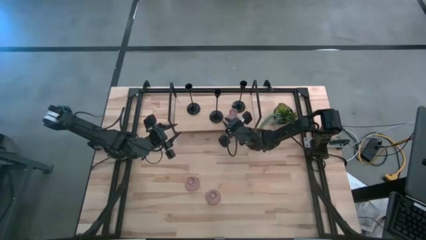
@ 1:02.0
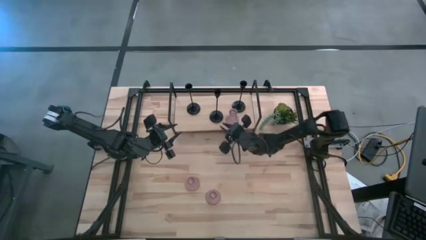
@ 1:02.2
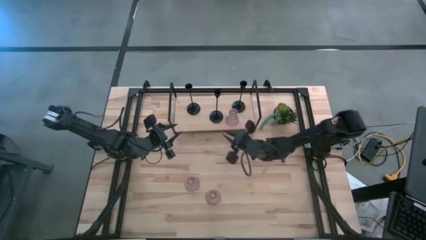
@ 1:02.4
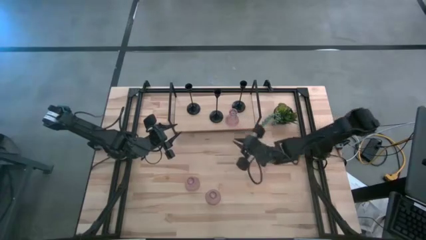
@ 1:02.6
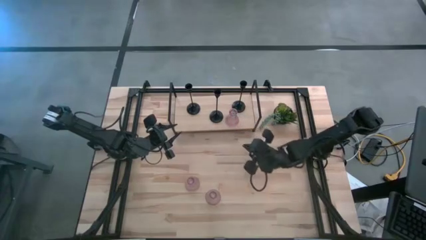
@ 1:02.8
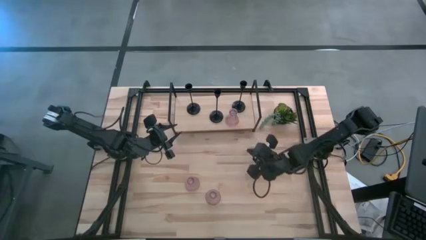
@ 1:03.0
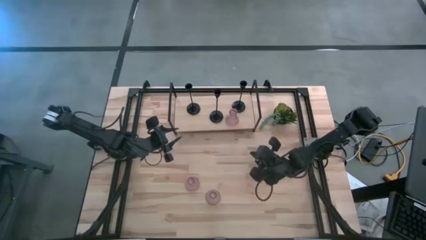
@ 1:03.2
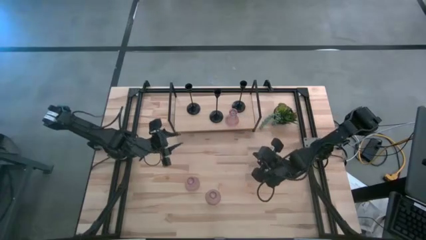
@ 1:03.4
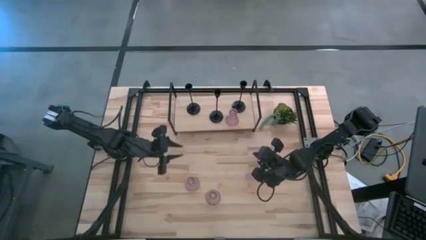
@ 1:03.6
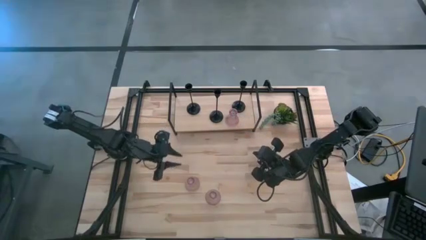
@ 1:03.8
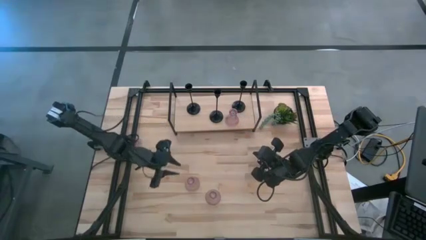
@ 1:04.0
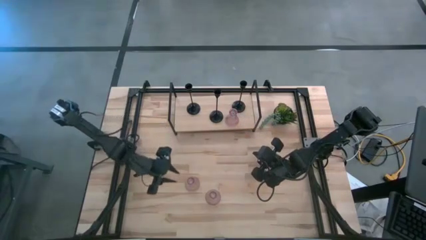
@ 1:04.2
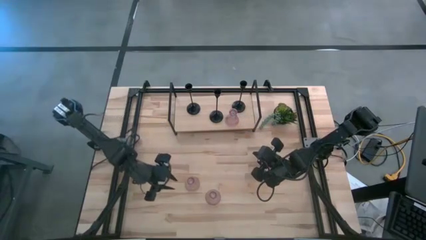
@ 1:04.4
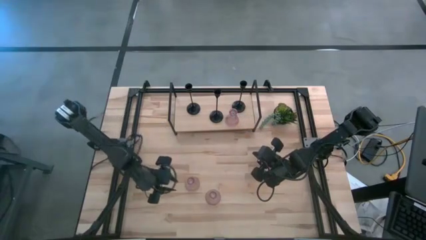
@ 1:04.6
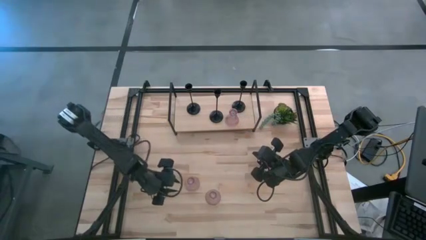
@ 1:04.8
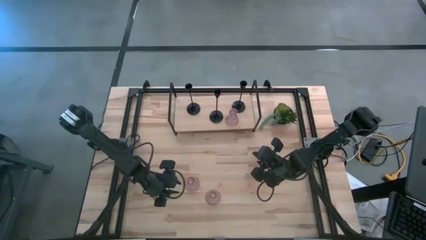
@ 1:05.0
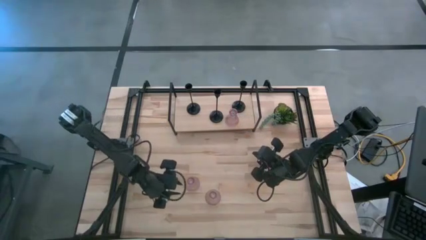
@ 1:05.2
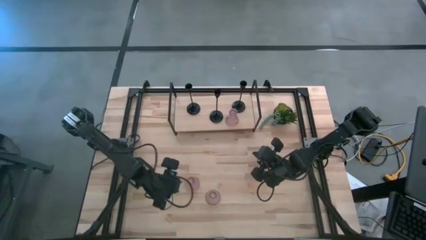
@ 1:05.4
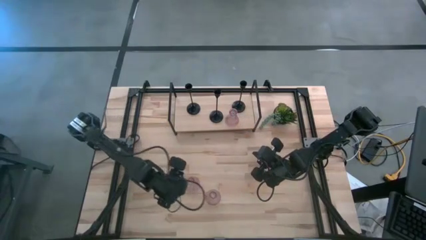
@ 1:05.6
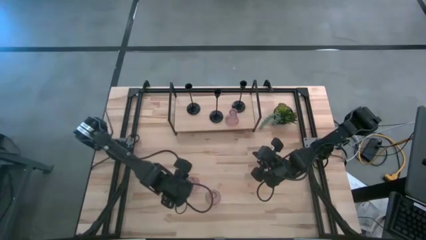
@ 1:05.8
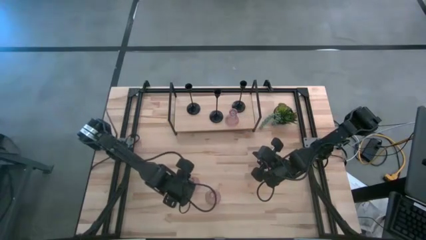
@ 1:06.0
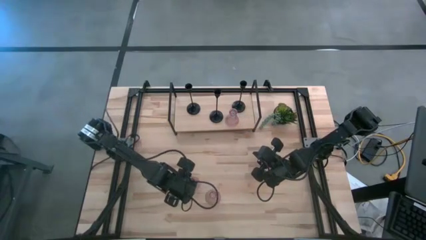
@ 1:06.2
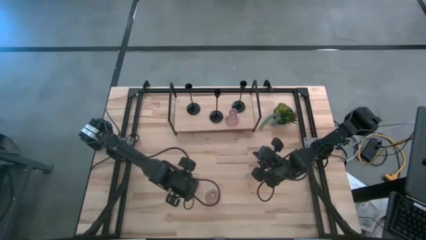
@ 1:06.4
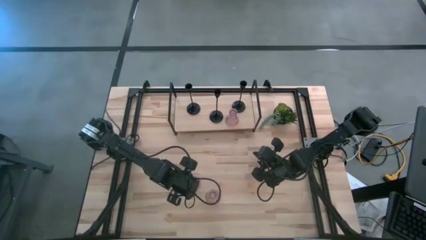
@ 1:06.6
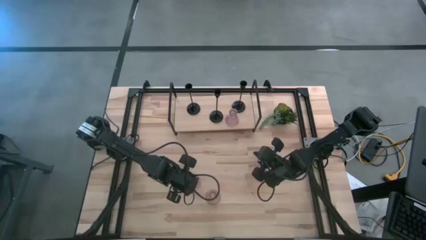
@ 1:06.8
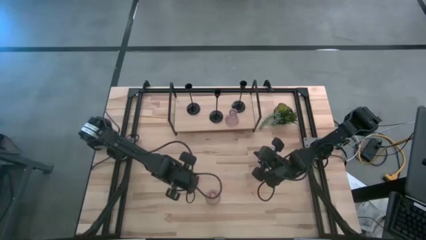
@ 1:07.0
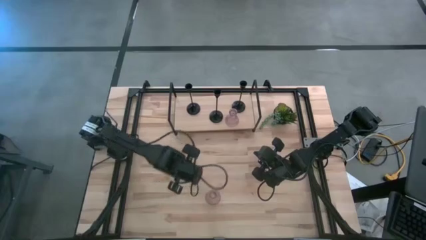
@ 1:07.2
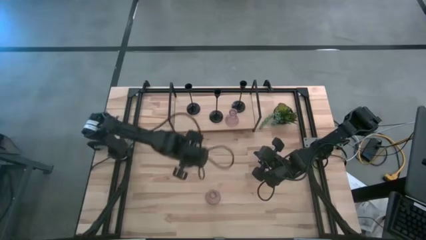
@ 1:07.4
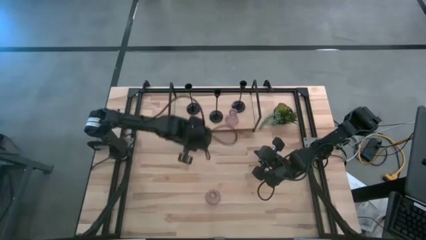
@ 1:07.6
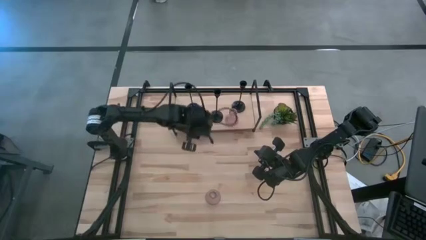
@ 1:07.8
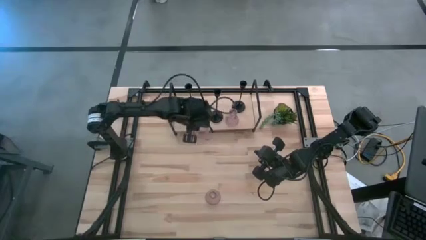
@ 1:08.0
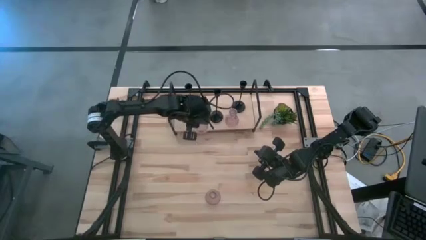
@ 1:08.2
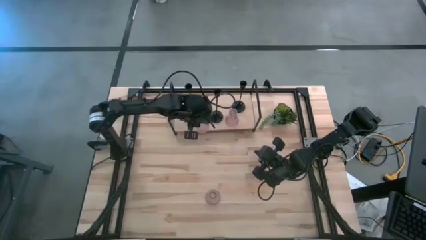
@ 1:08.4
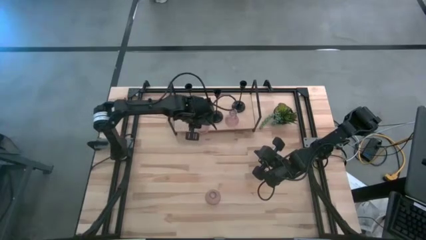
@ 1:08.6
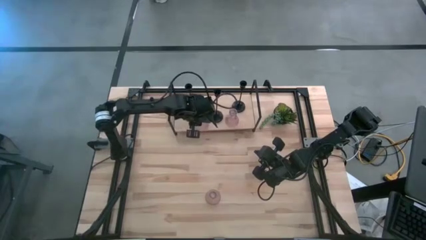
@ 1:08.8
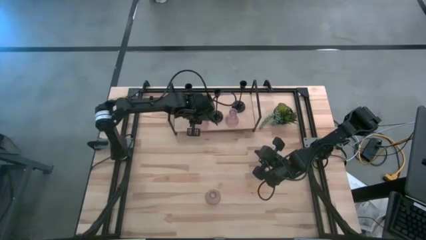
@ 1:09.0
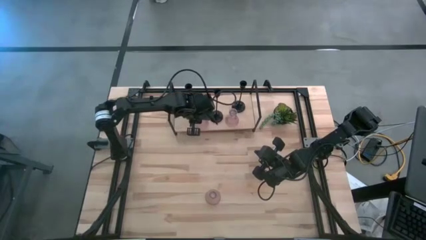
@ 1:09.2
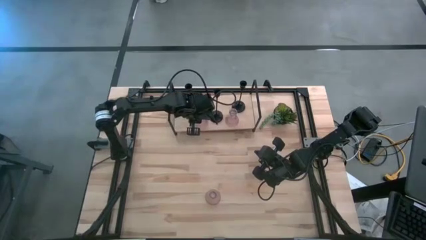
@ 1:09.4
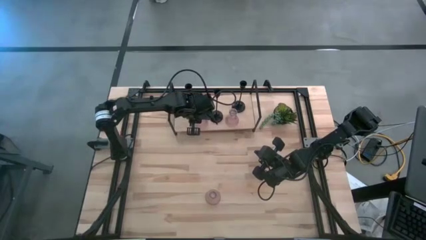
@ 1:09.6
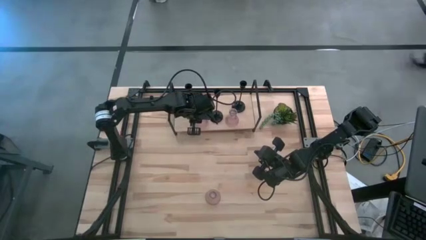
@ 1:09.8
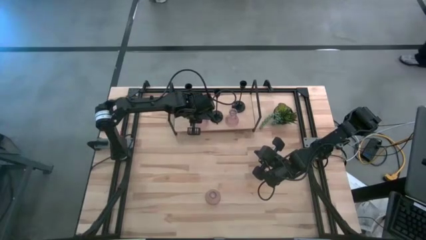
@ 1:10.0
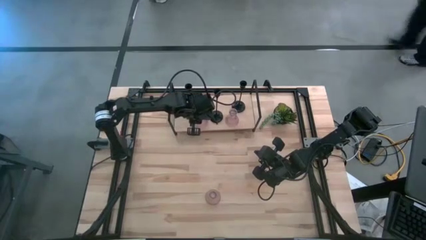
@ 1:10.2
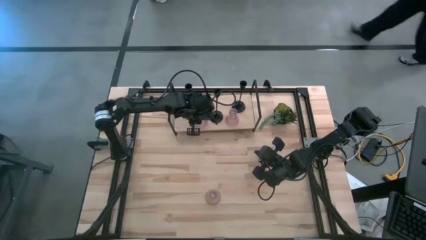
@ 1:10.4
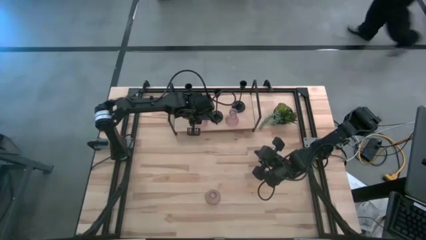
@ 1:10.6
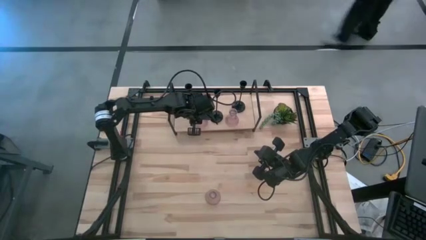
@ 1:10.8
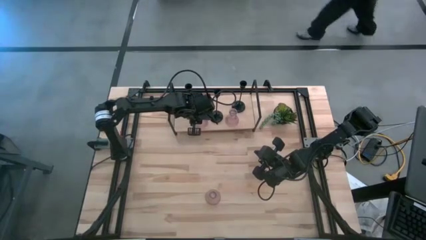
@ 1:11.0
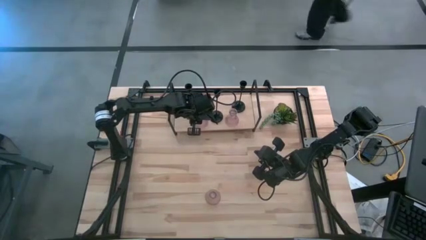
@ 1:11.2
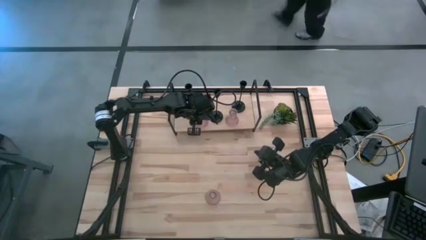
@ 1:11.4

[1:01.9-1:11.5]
Task: Pick & Place candle stick holders
Put the top pink candle holder on the shelf

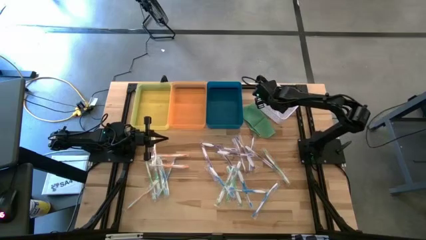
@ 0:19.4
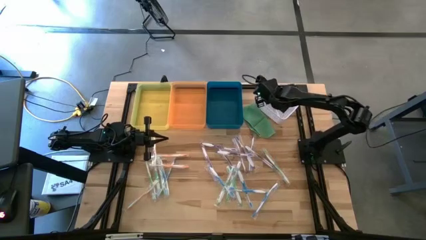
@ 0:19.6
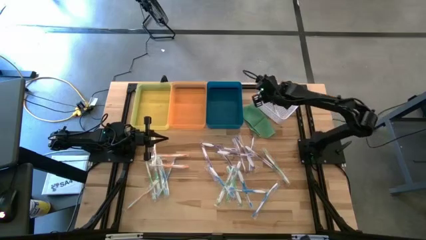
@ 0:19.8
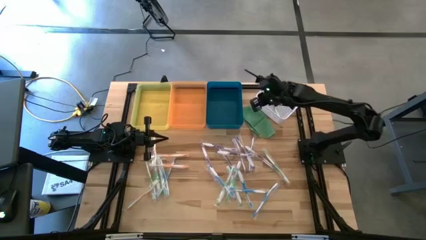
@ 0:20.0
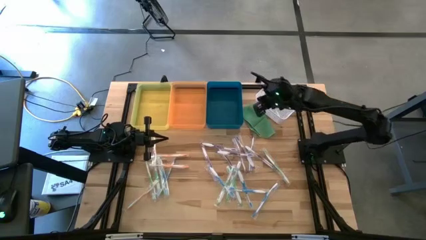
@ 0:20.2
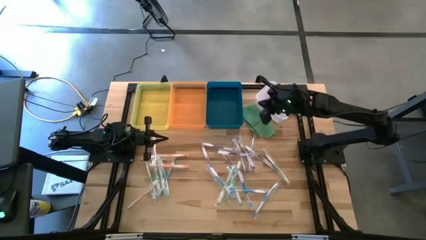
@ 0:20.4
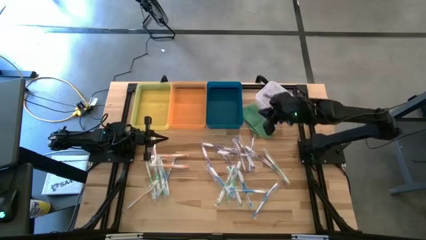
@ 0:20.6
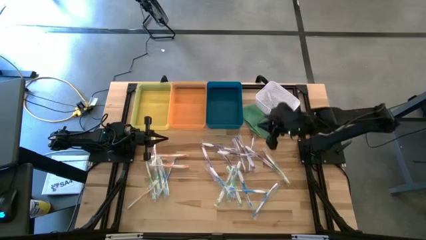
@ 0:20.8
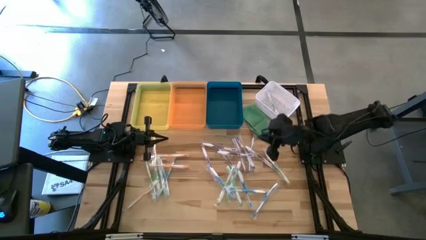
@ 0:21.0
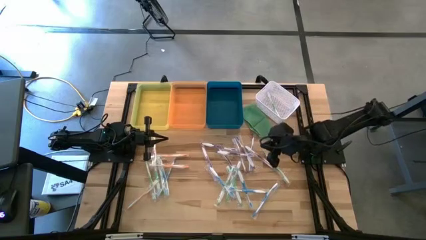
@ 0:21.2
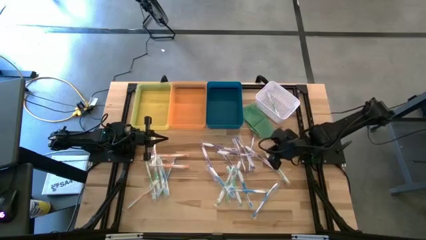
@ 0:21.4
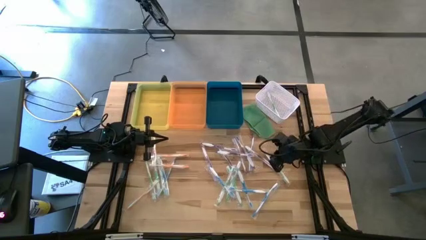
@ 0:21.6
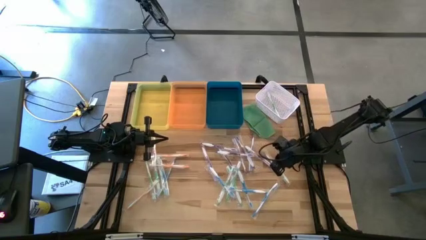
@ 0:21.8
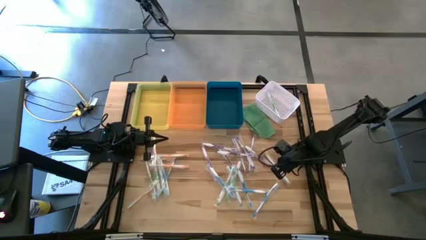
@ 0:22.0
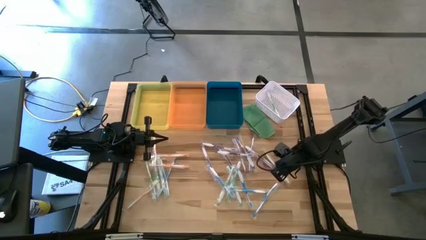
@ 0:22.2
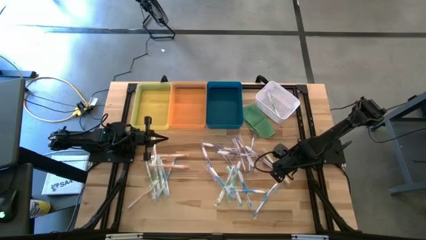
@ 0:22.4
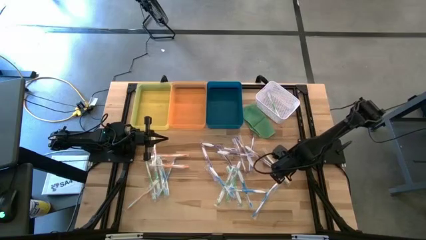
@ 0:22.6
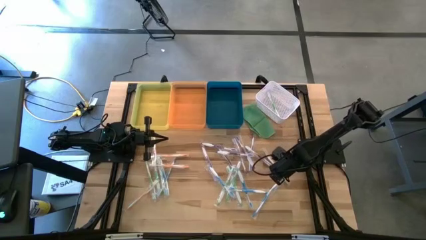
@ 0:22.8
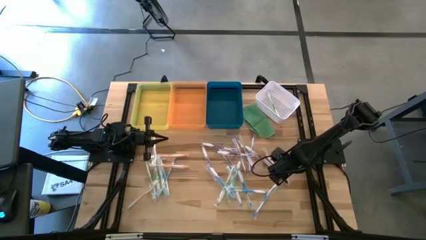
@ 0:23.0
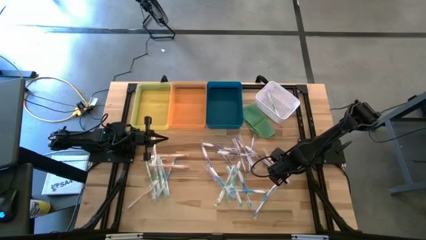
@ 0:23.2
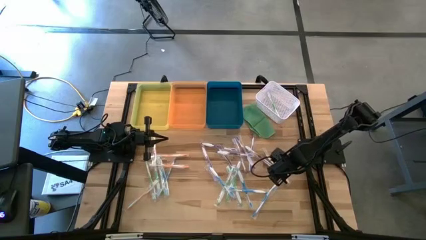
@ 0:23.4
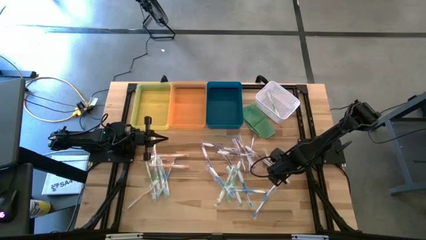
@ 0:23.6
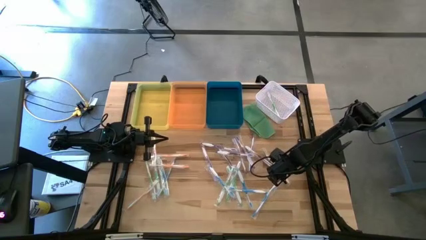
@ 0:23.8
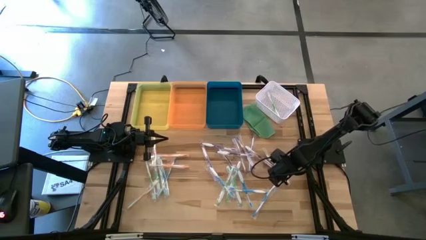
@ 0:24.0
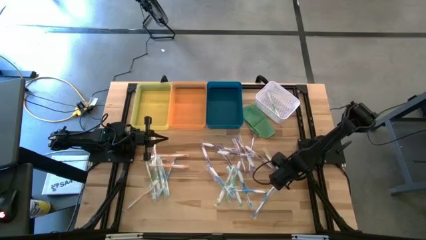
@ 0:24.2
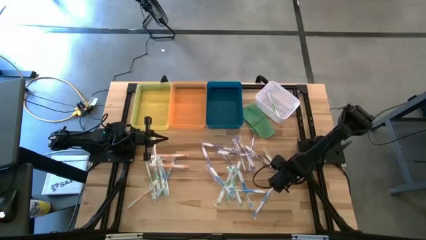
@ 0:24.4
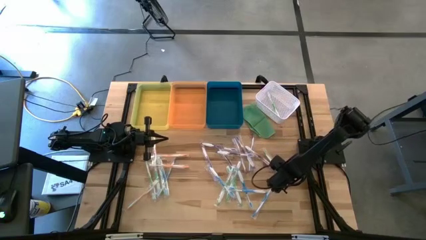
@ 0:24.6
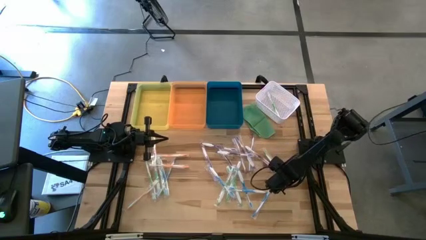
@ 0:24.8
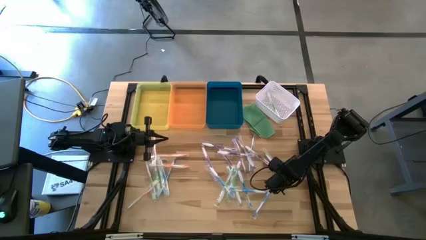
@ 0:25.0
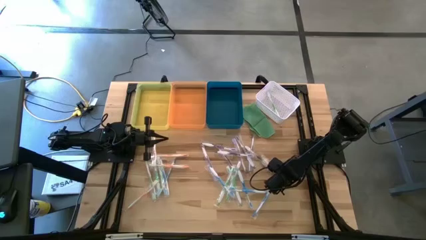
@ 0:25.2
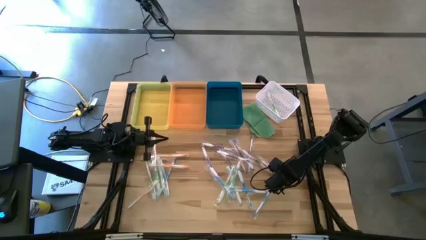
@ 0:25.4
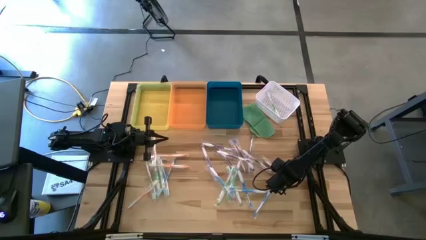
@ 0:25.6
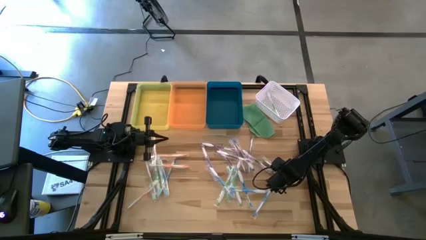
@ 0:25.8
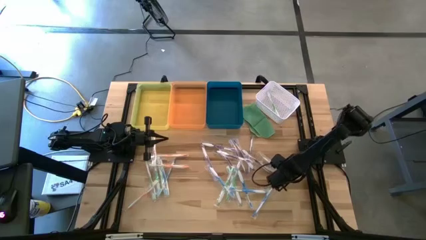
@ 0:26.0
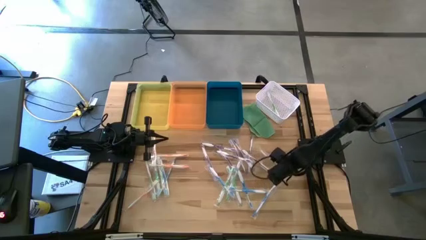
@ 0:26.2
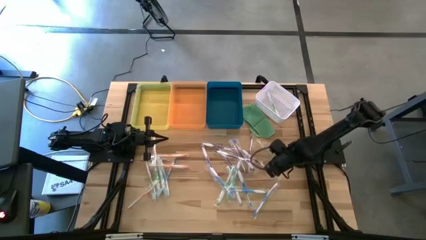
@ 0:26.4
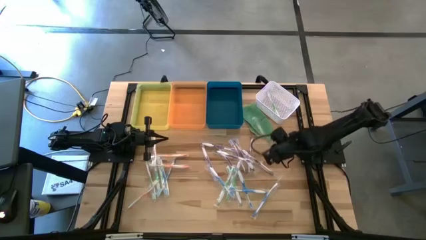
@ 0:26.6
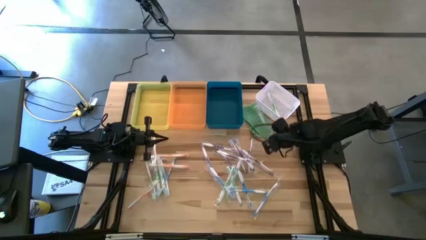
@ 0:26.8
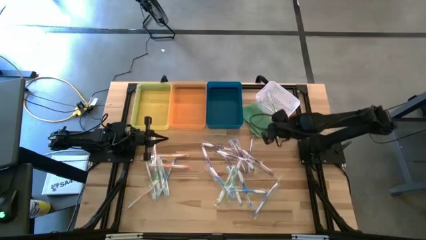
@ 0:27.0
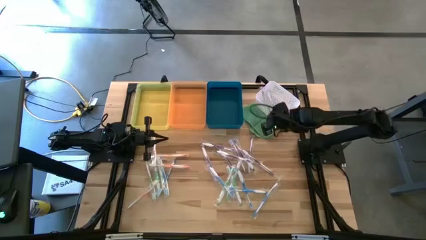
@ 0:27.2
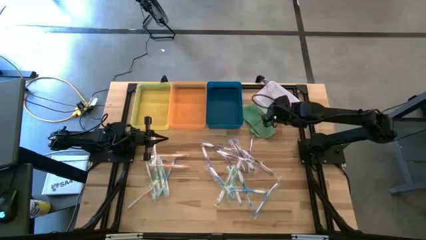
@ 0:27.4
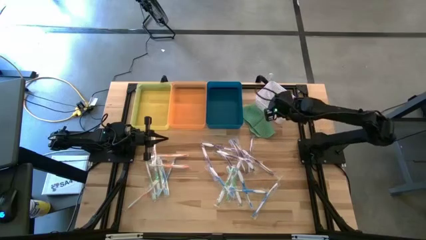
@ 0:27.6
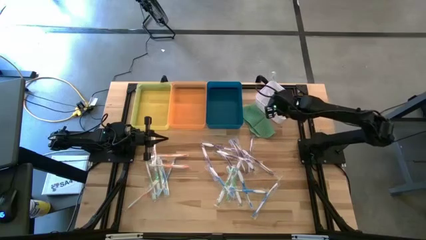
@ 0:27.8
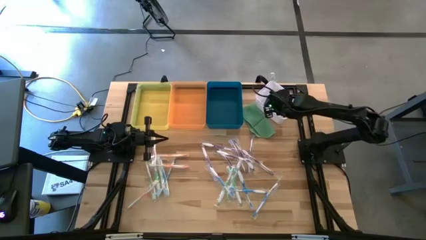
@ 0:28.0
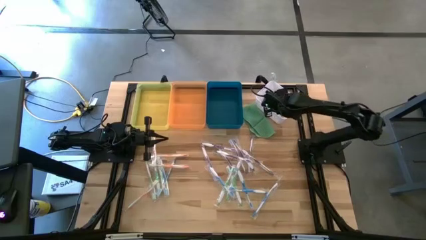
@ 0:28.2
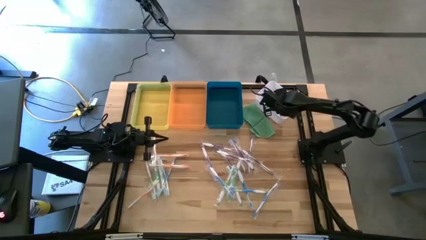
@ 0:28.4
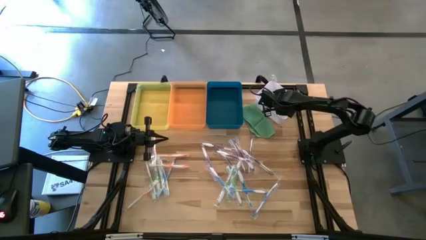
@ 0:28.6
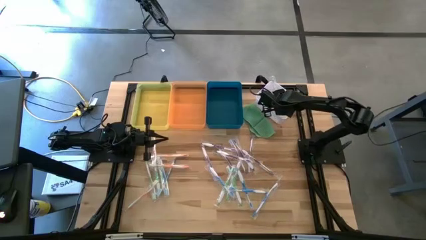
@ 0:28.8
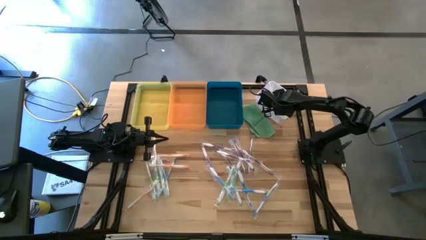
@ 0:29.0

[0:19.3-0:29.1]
Task: Pick & Place Toothbrushes
Put the green toothbrush into the white bin
